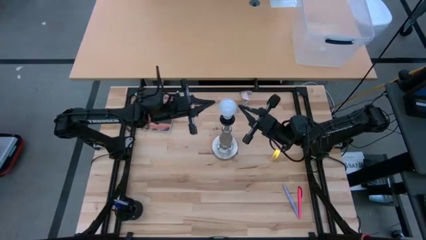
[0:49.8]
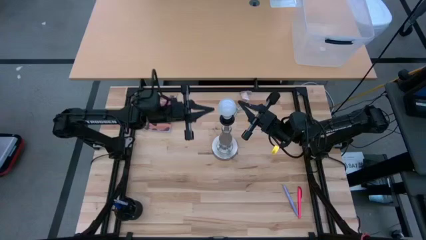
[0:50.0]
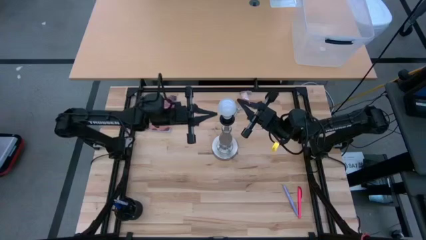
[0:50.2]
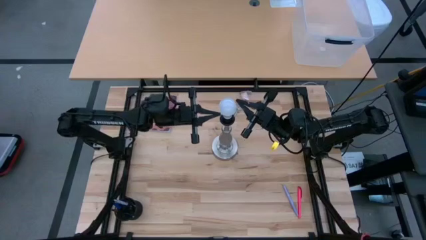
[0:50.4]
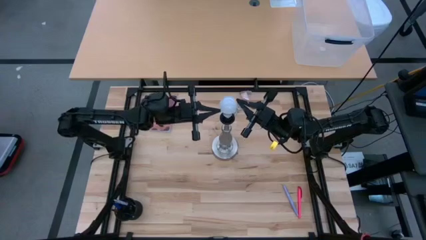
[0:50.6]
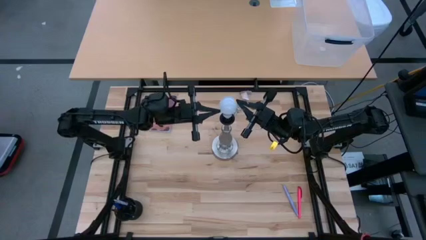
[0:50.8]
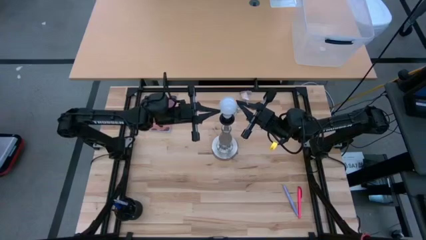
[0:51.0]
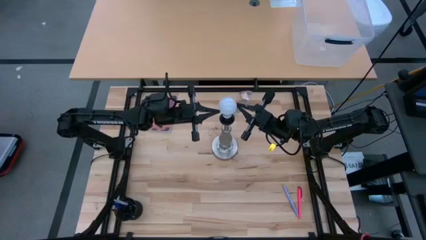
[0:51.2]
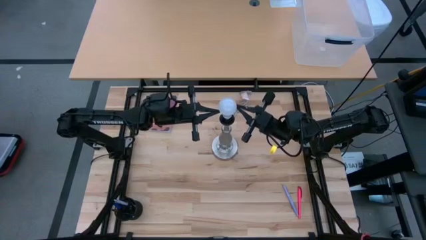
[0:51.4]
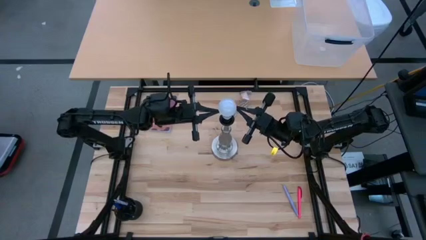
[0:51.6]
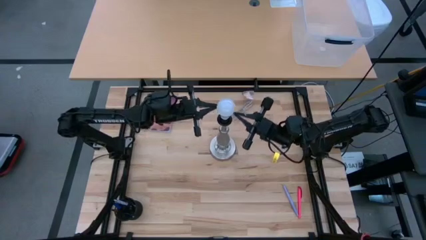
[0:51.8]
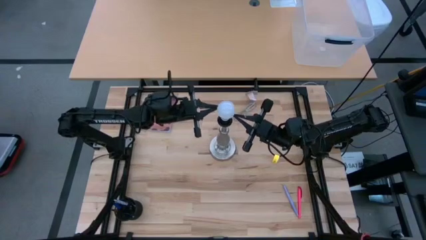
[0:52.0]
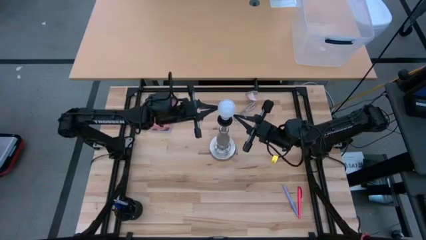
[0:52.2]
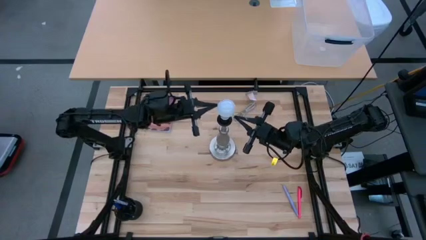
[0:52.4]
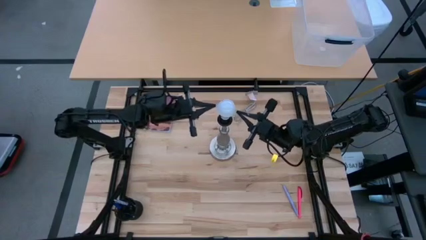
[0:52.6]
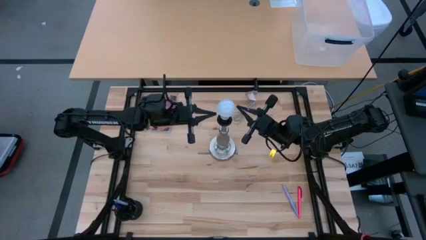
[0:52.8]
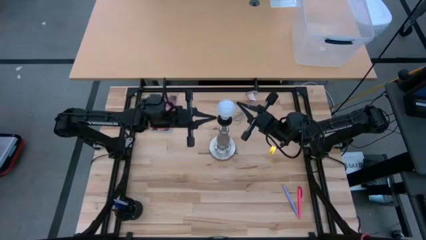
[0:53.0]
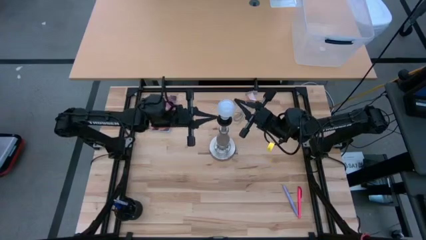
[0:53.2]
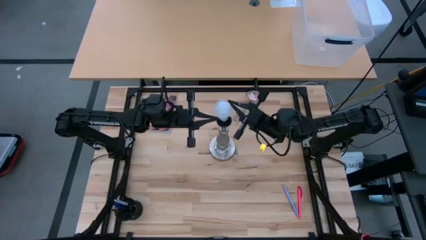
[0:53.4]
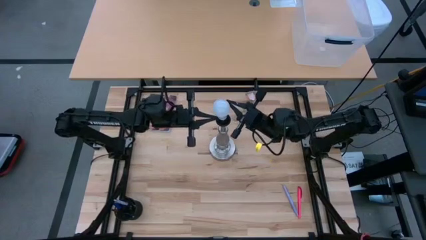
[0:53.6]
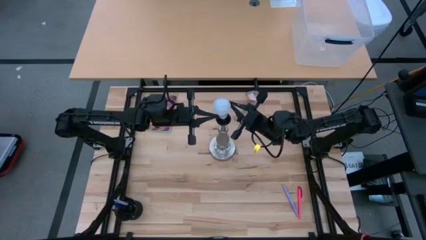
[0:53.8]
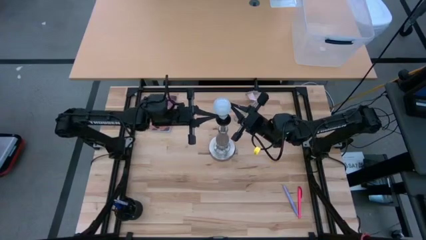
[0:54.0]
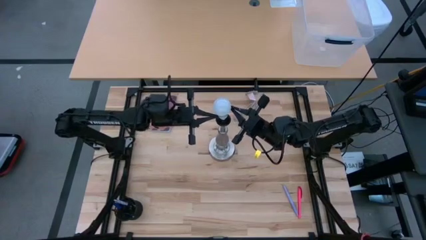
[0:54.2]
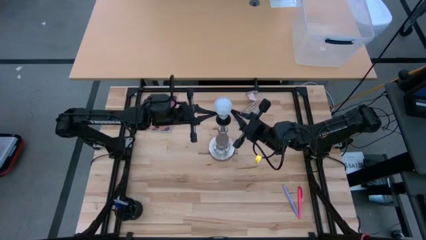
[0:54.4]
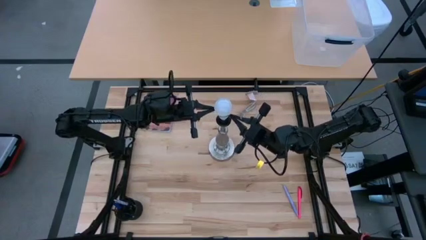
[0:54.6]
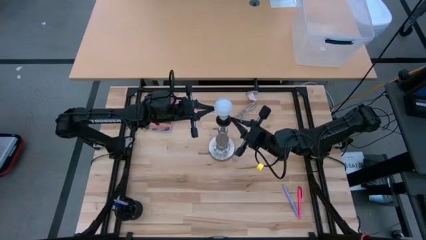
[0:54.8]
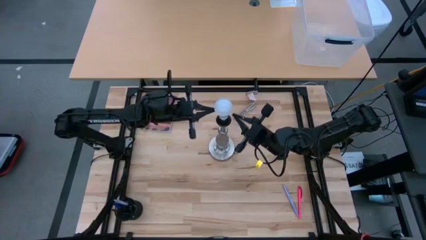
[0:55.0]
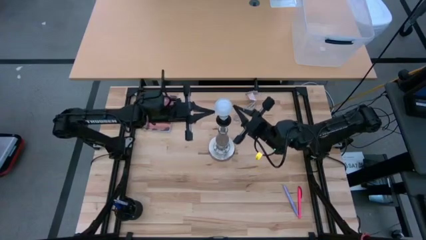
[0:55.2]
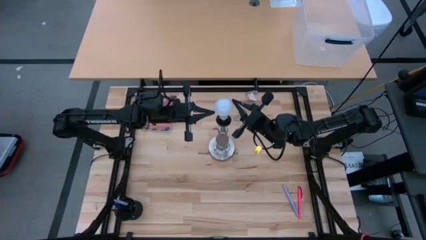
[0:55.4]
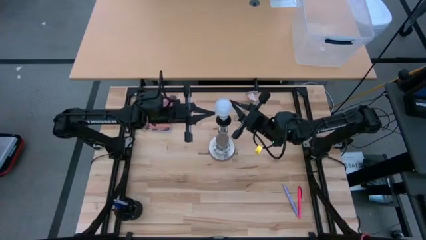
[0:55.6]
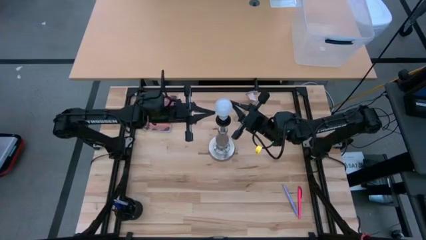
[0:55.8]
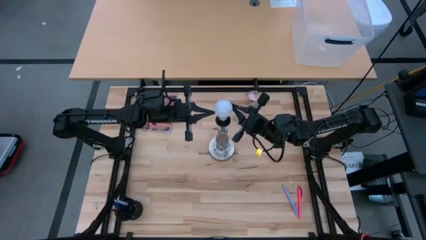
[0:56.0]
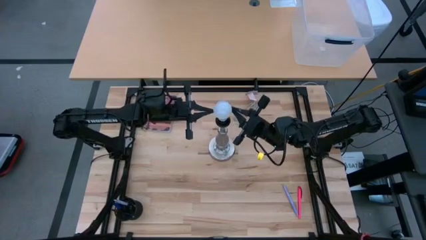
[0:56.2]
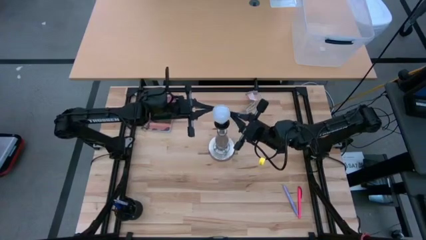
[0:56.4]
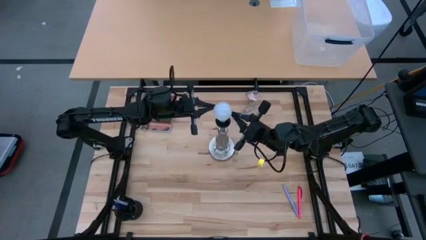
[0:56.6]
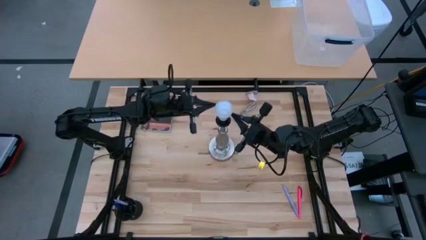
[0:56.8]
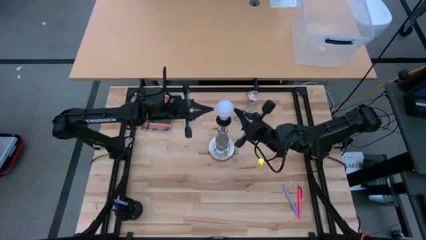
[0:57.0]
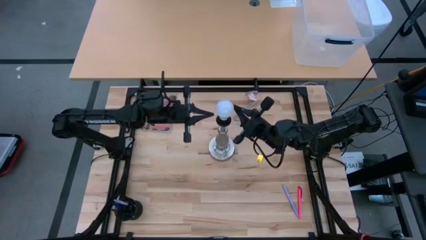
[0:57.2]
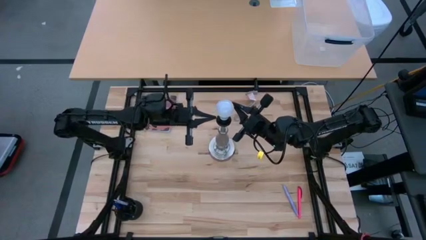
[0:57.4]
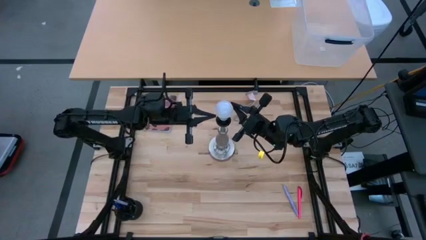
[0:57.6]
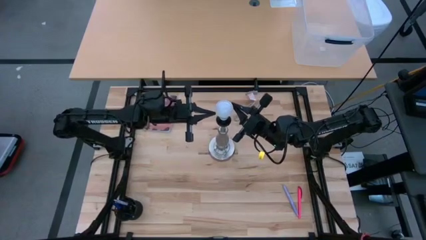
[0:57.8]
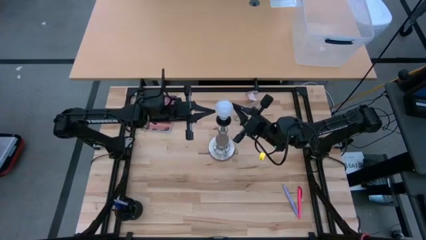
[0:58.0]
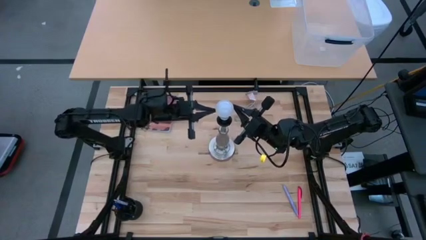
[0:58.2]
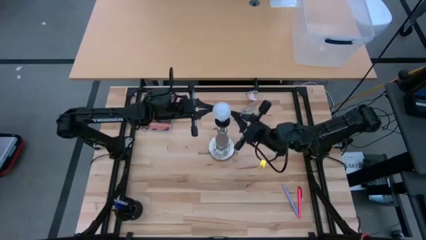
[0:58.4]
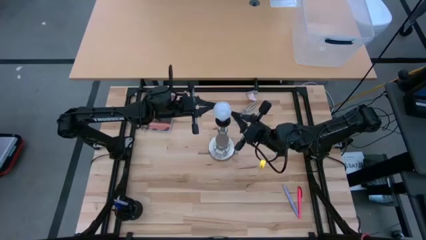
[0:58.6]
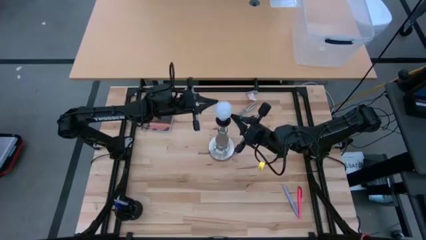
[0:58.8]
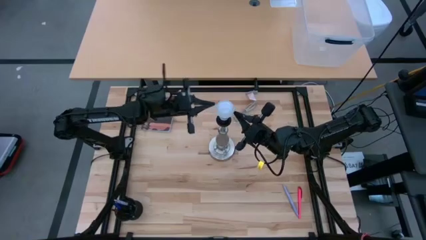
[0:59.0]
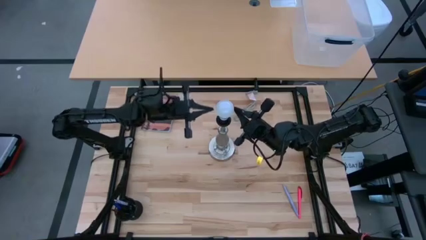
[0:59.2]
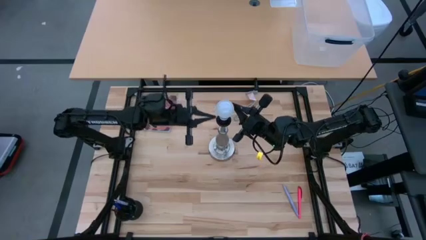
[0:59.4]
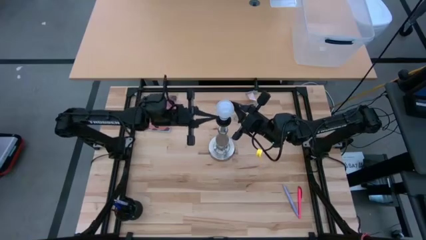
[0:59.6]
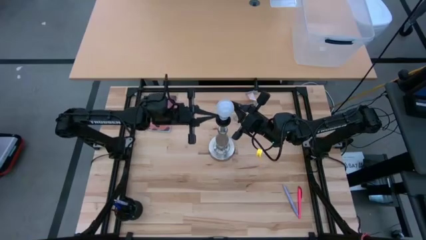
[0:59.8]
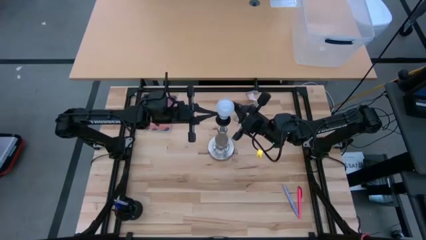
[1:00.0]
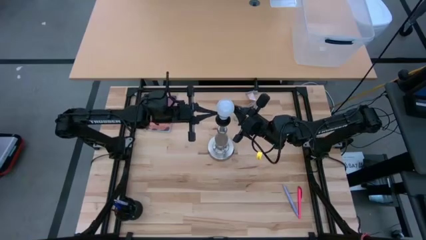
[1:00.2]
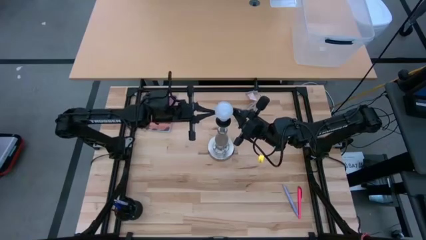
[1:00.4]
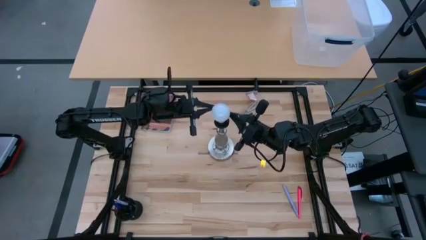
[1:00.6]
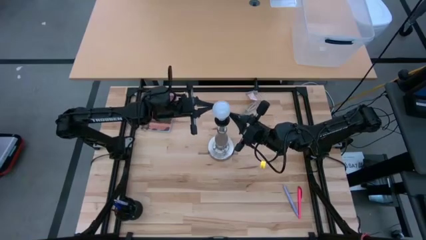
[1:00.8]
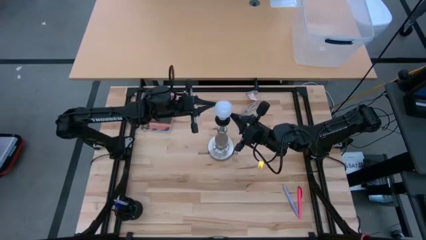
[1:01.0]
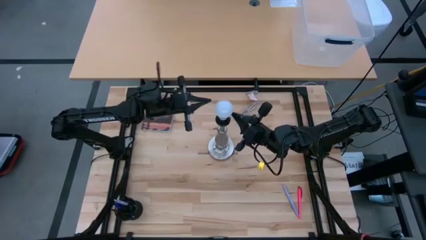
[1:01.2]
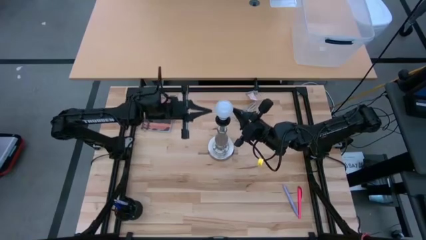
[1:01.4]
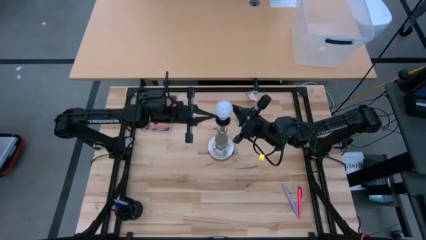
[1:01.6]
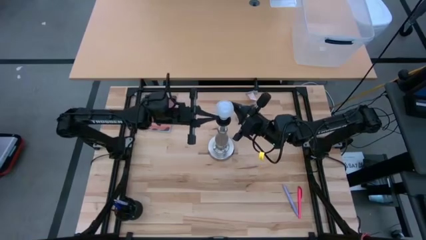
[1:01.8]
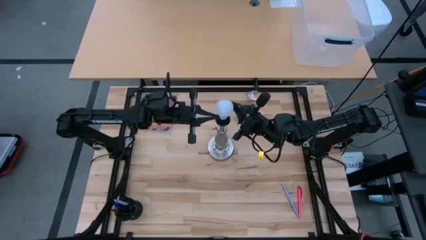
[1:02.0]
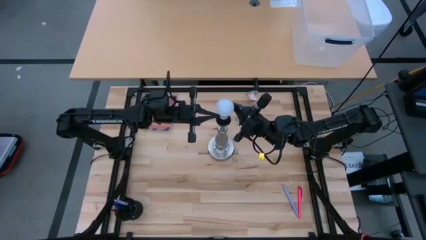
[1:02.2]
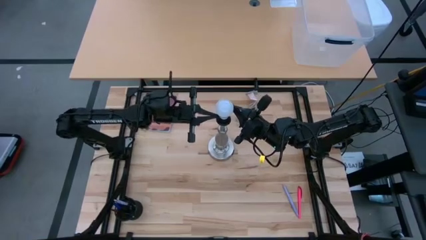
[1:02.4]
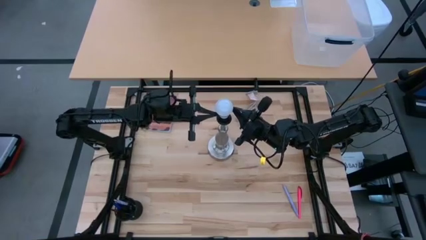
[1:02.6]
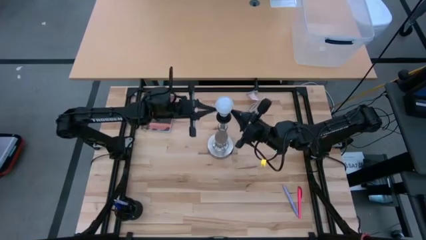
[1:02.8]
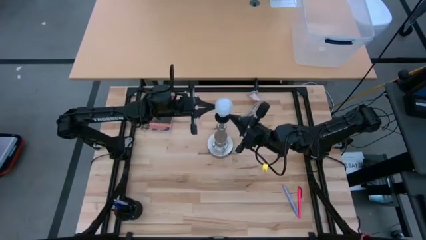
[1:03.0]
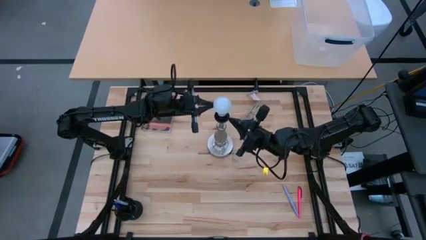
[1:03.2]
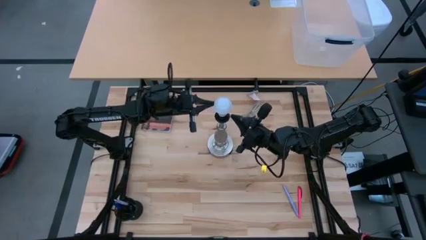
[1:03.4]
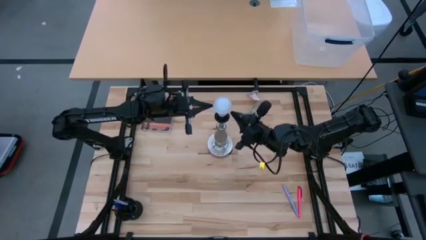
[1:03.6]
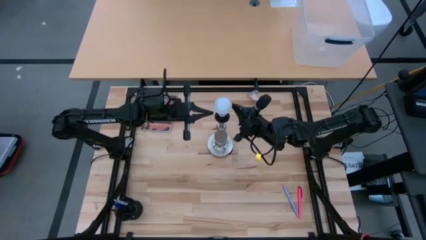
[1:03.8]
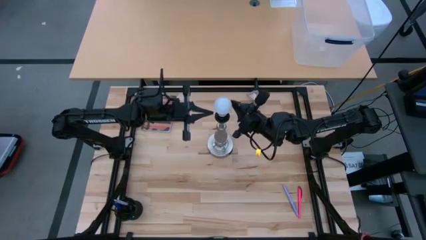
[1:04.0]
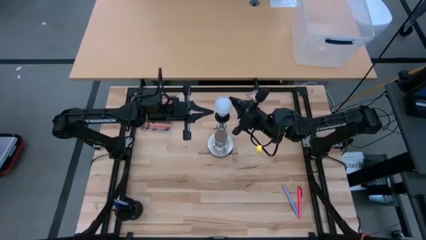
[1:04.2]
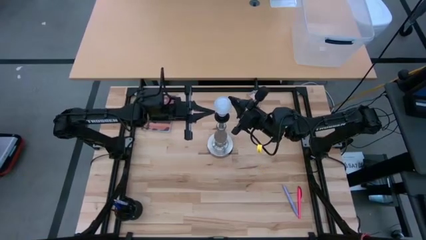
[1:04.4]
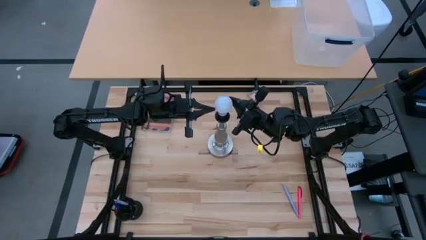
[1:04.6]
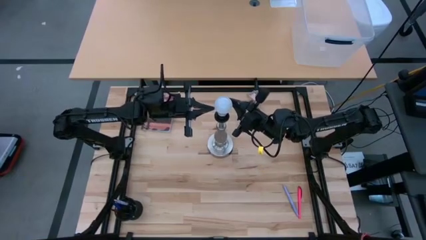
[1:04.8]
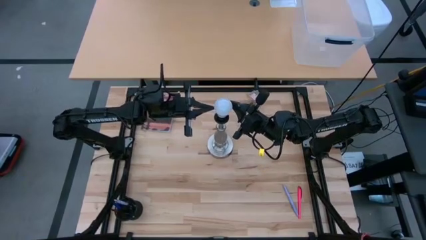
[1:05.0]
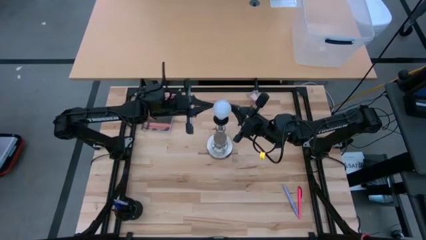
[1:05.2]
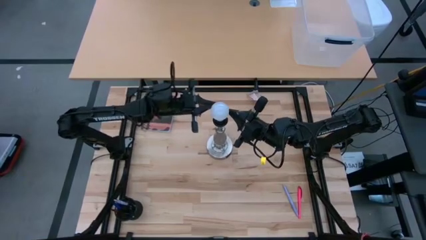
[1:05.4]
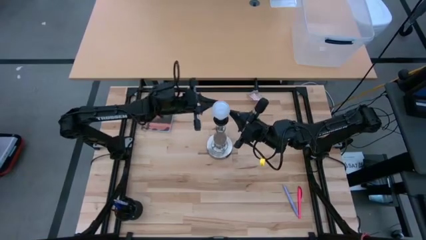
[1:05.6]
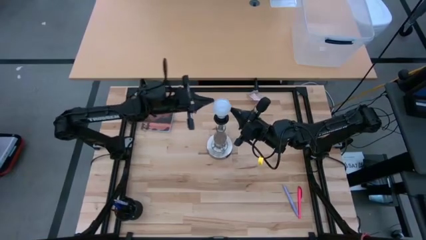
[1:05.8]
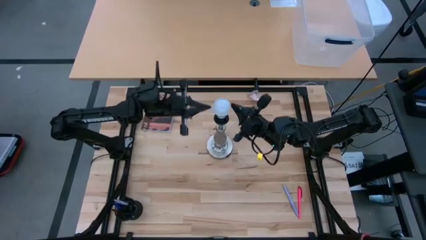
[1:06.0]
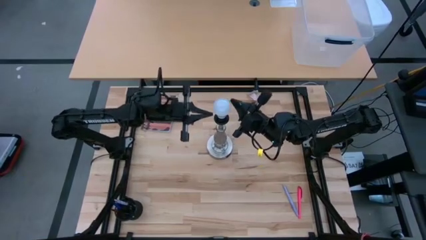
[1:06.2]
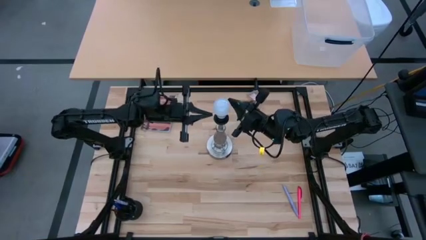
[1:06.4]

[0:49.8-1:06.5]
Task: Screw lightbulb
Insert the lightbulb into the silver lamp
